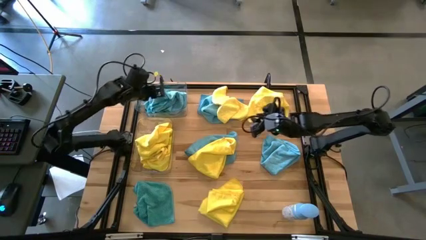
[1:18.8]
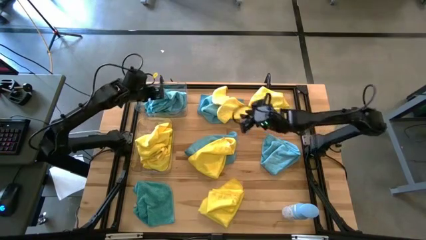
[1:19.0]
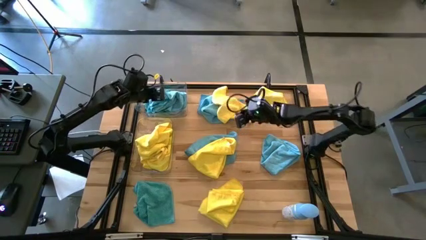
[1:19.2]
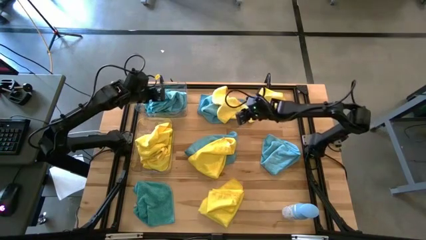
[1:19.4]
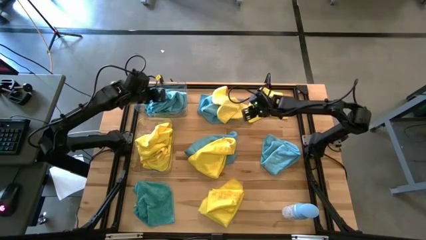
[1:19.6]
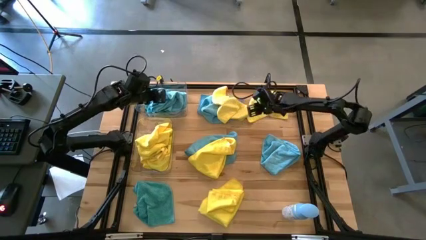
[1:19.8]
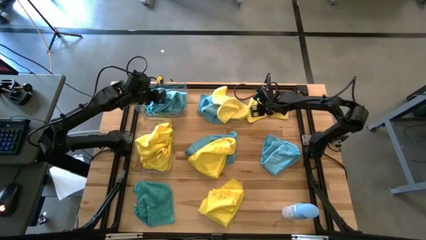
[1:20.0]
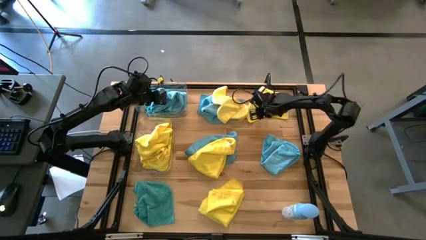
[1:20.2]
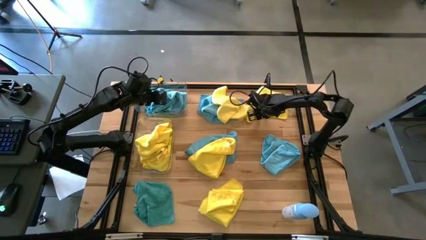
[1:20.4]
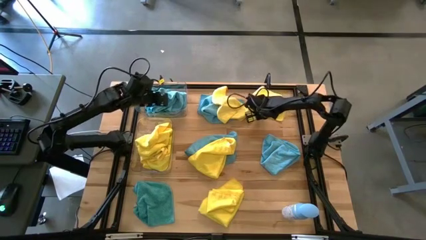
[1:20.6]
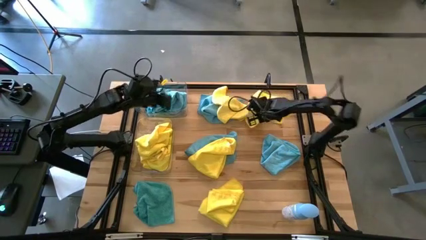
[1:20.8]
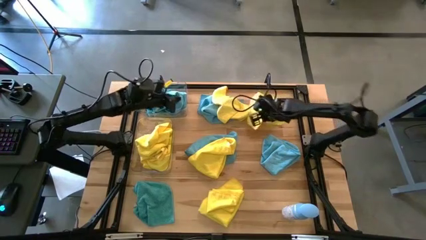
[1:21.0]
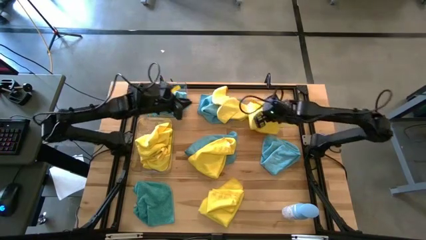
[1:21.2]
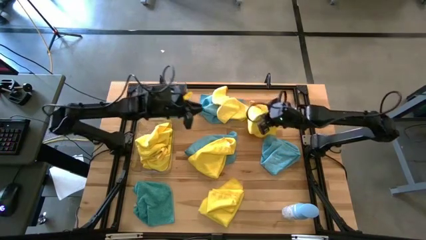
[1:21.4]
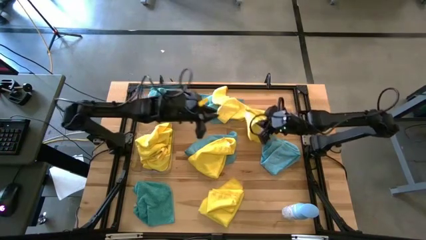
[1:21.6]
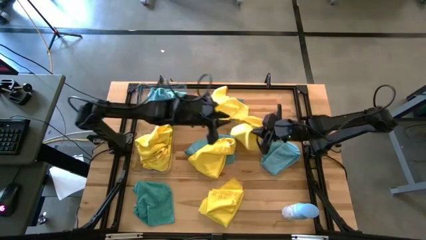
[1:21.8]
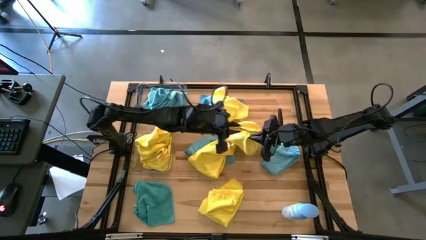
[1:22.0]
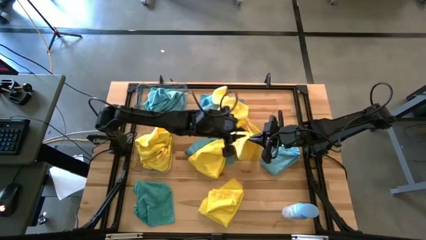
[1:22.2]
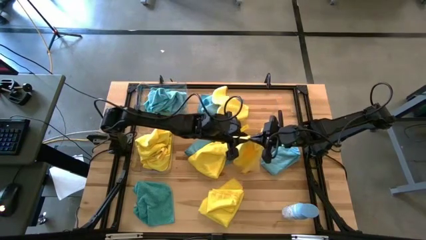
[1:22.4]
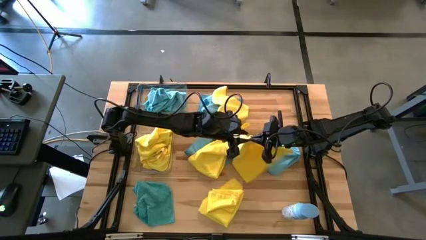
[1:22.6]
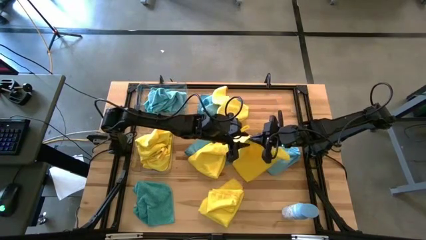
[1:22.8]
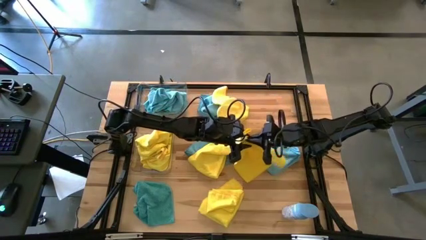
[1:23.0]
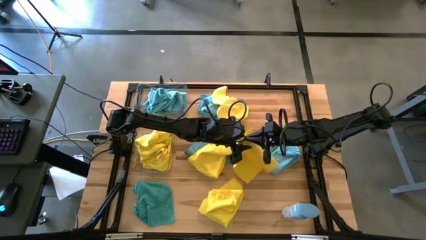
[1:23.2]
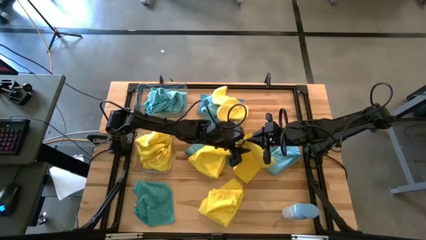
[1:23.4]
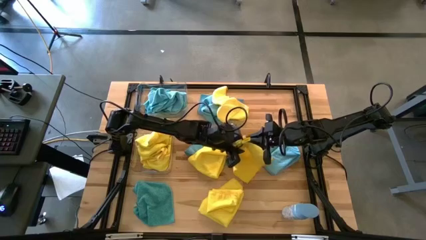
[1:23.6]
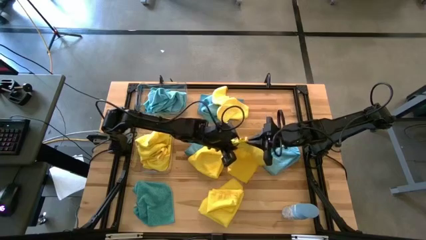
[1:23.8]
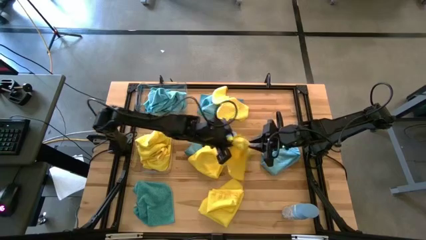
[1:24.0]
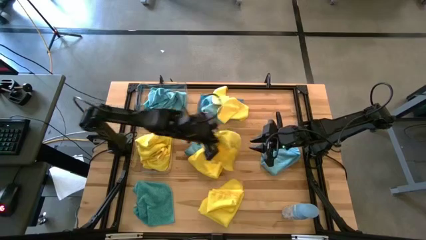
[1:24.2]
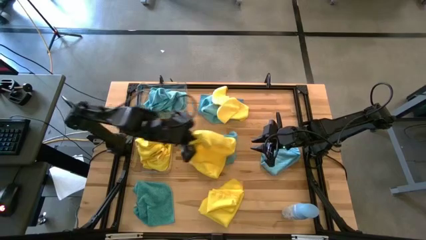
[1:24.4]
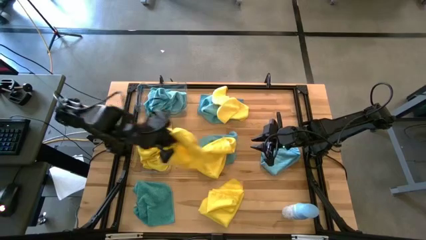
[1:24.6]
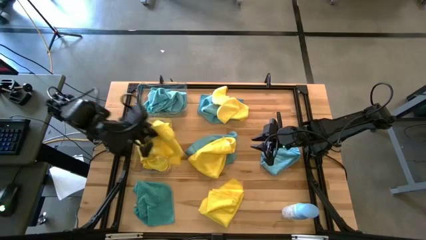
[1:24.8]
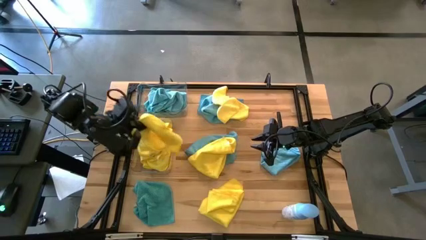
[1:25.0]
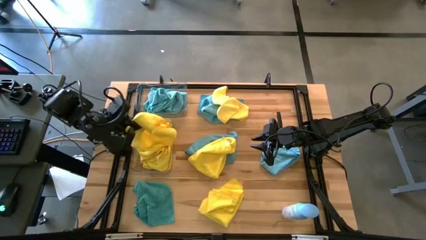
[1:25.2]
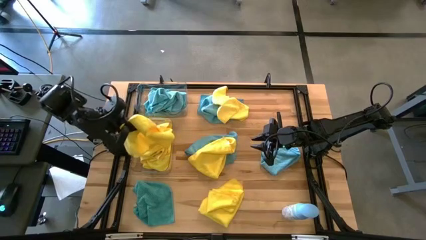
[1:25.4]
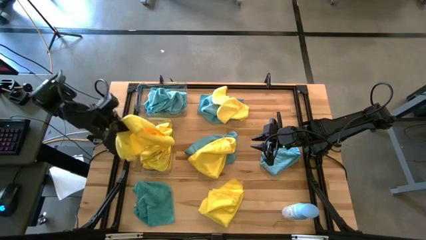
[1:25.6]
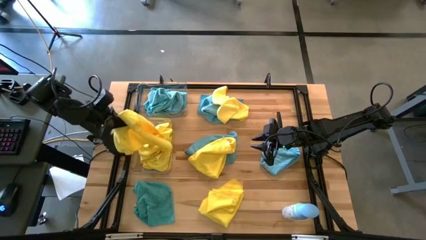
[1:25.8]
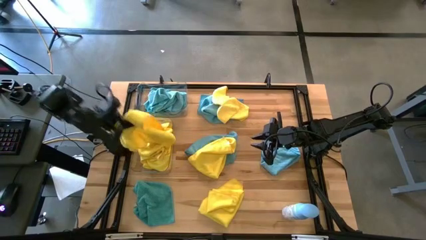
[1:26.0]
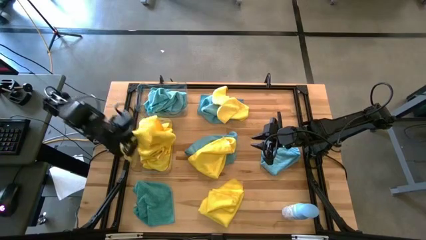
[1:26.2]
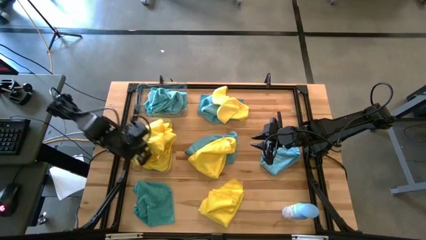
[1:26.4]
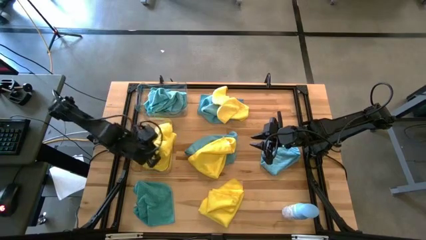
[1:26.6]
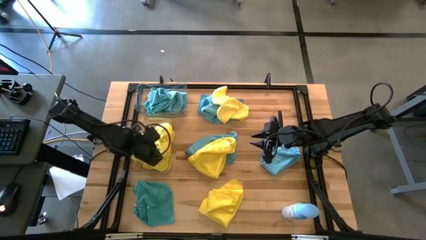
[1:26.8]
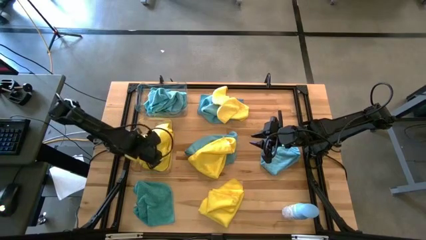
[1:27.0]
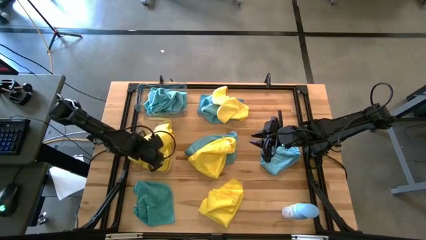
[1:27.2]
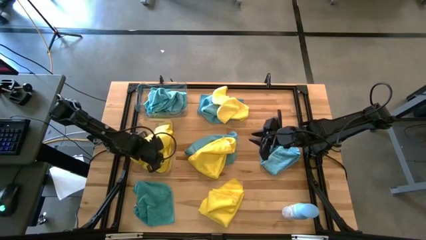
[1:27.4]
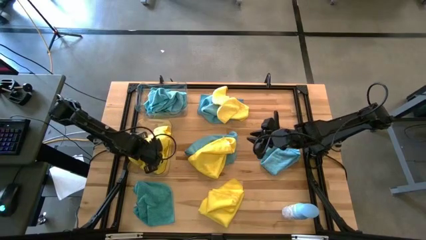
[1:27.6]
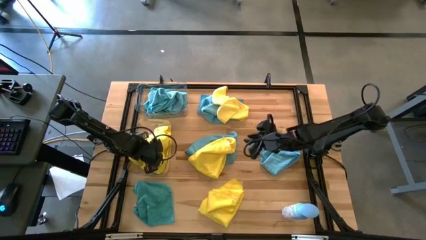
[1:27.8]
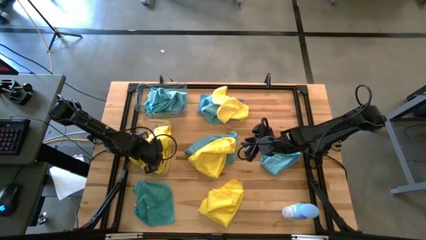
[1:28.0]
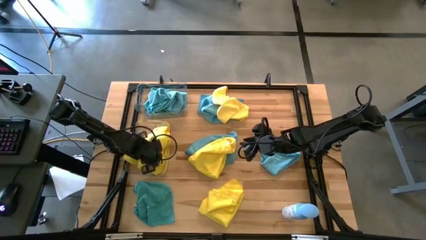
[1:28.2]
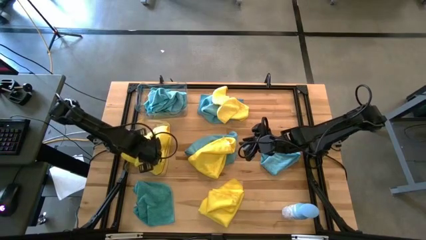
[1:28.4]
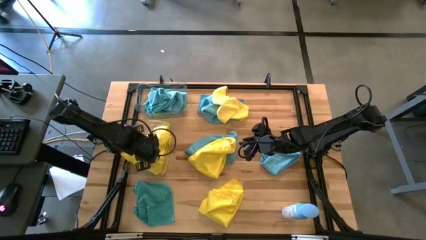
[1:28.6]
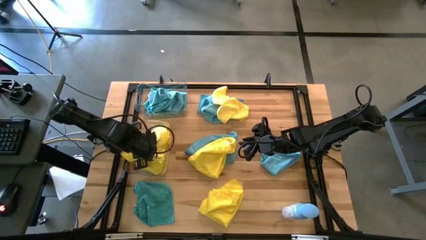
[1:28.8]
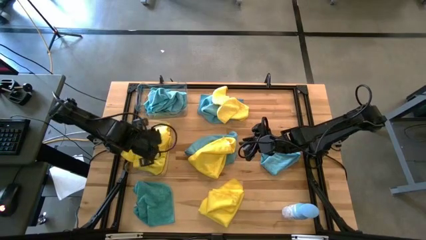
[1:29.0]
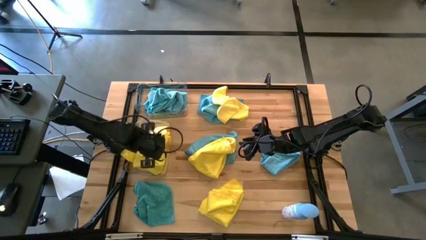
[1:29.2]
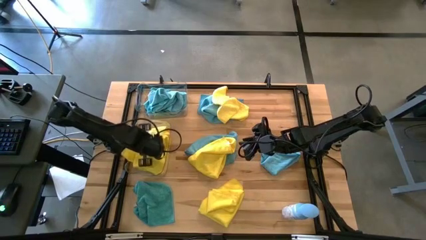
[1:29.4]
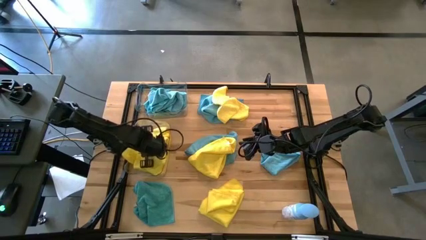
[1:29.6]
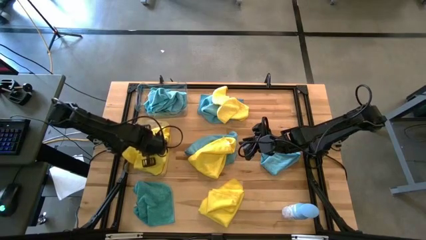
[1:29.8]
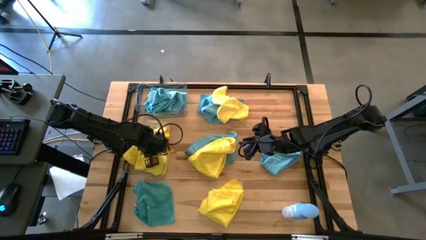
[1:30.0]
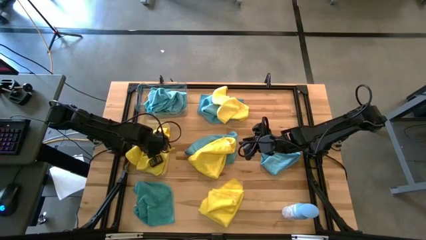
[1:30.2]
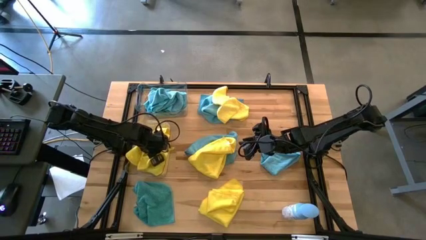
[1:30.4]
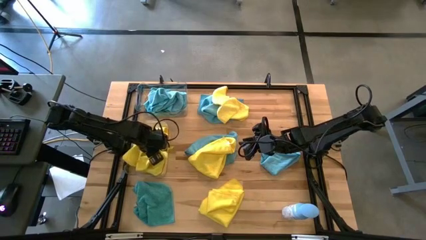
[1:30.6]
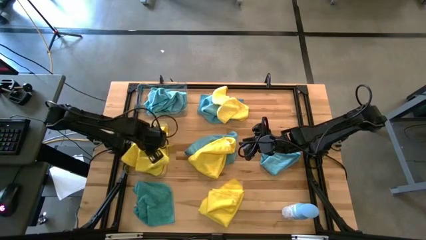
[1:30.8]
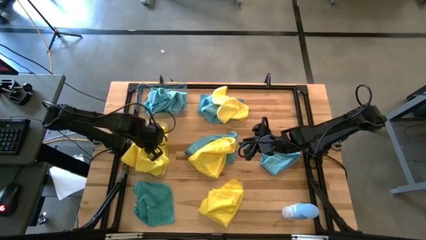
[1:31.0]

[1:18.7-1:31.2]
Task: Sort microfiber towel by color & place in baskets
Put the yellow microfiber cloth into the bottom transparent bin
